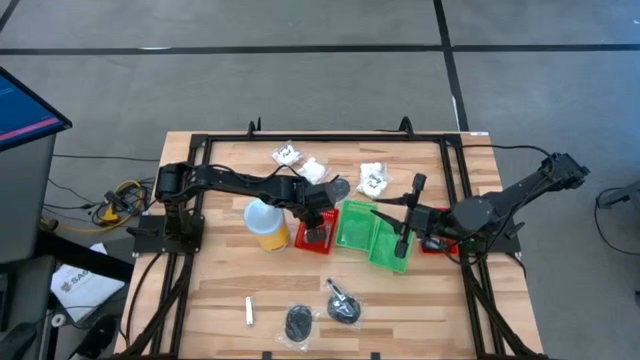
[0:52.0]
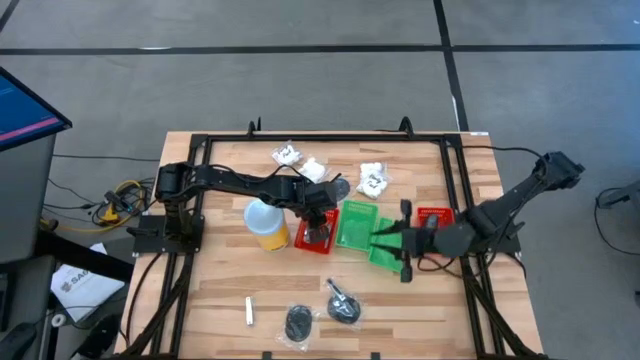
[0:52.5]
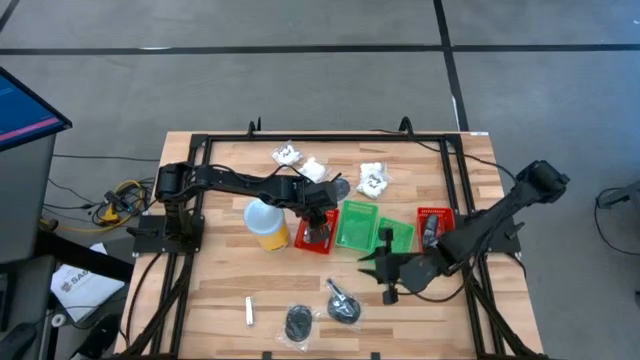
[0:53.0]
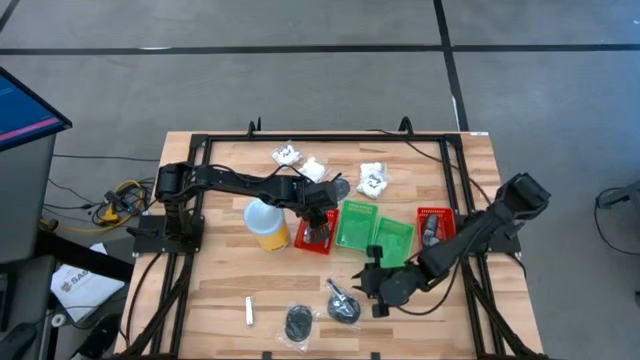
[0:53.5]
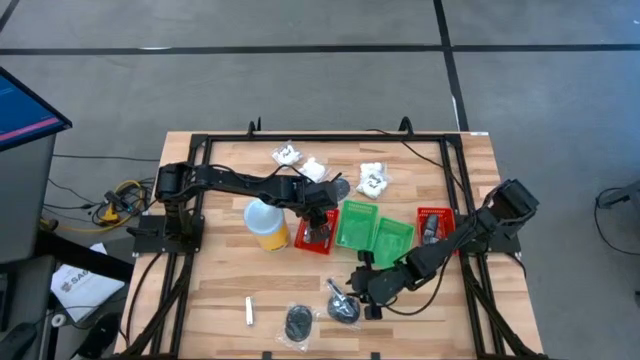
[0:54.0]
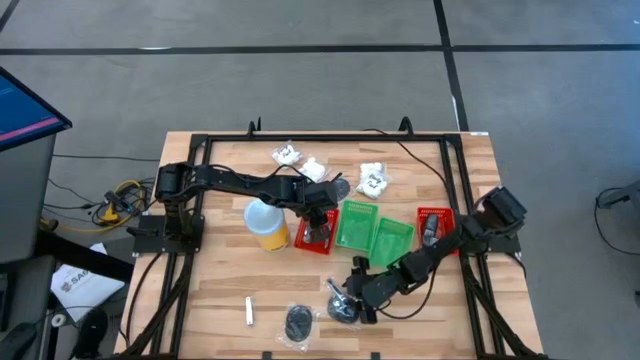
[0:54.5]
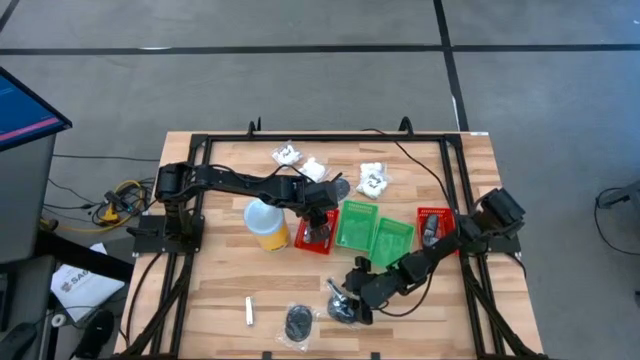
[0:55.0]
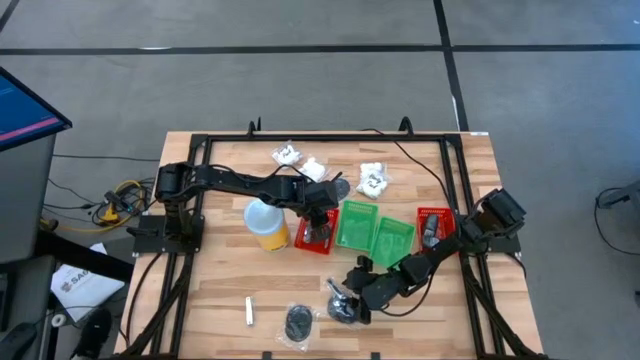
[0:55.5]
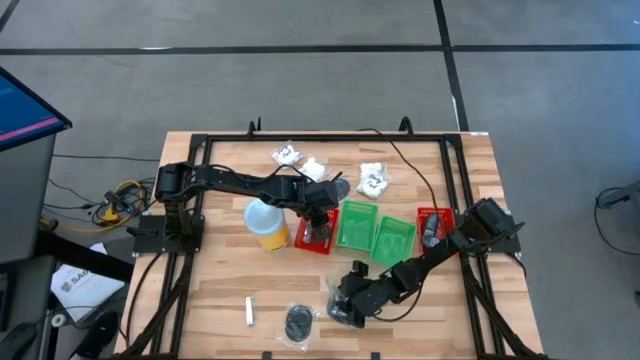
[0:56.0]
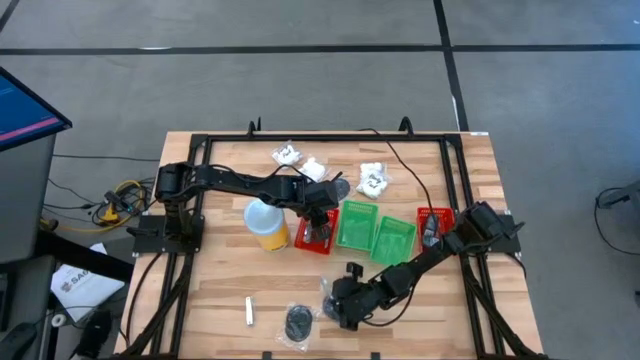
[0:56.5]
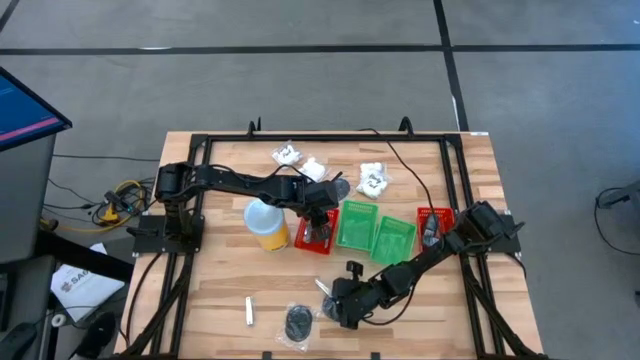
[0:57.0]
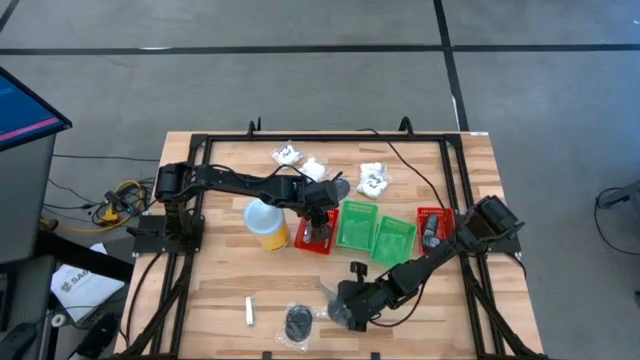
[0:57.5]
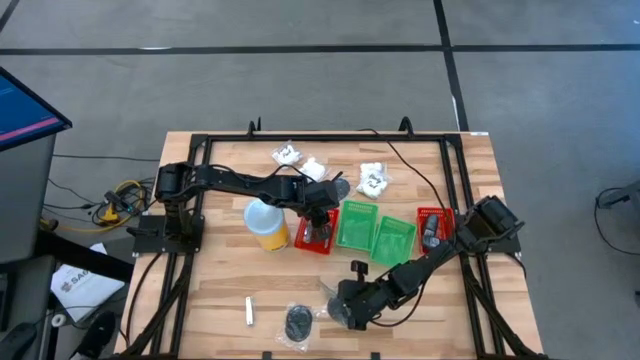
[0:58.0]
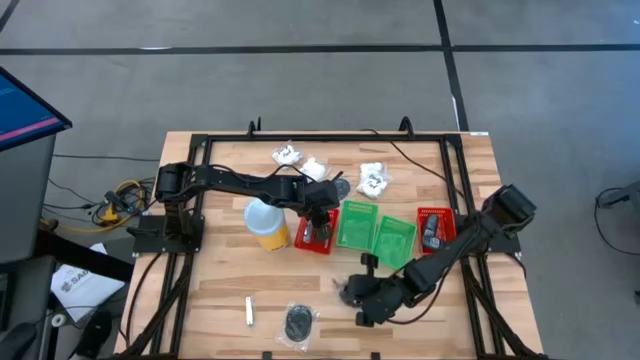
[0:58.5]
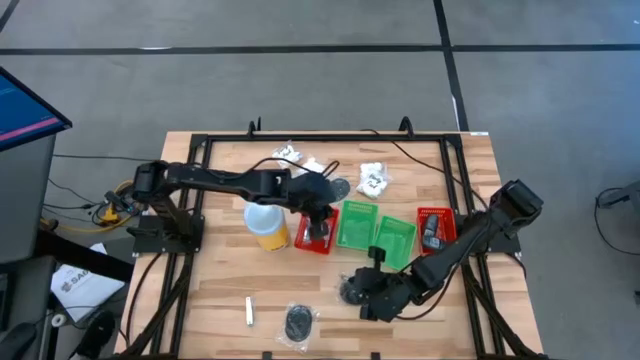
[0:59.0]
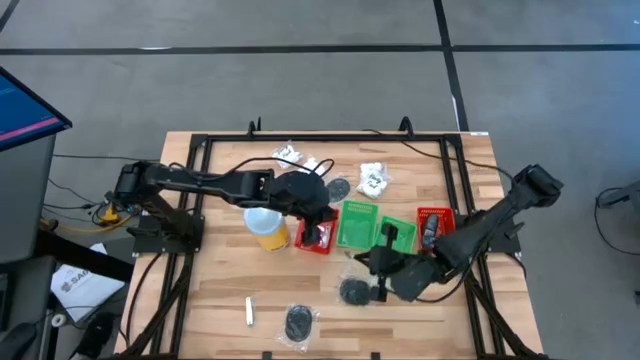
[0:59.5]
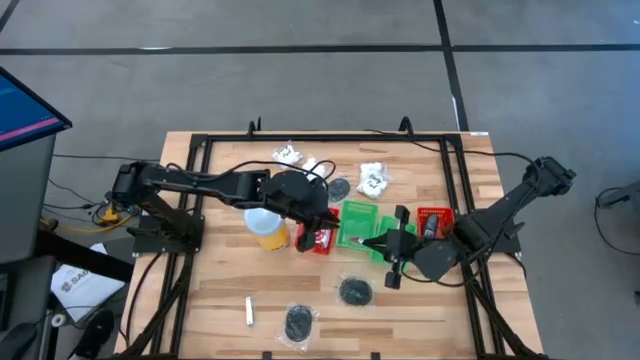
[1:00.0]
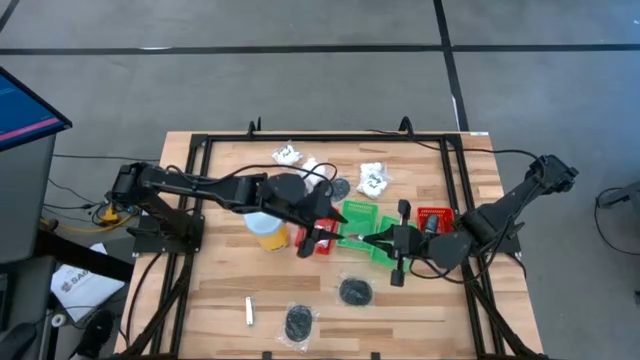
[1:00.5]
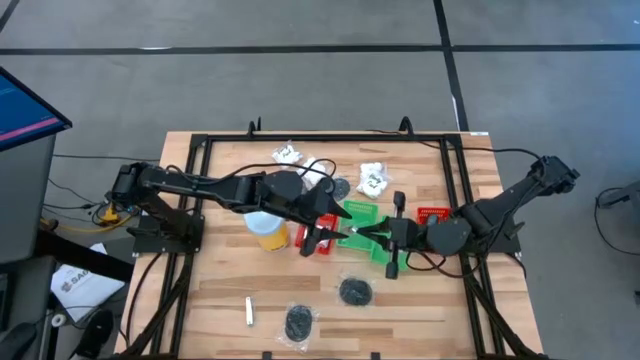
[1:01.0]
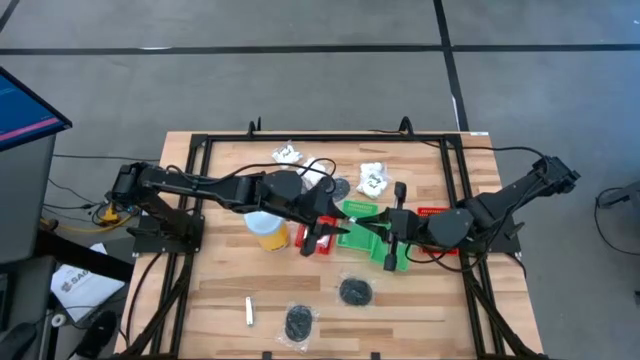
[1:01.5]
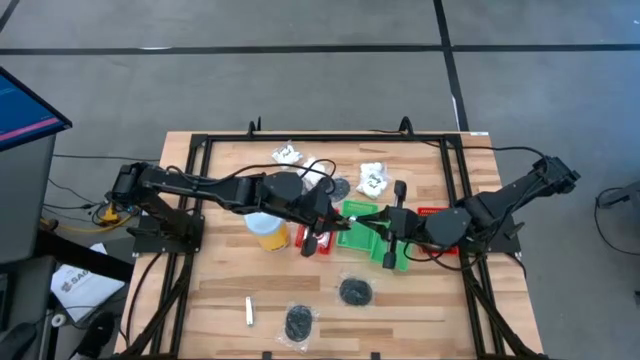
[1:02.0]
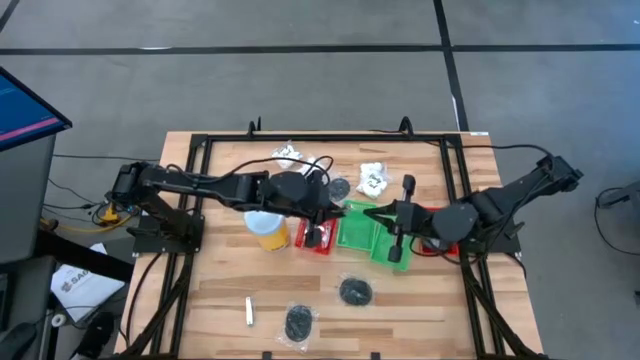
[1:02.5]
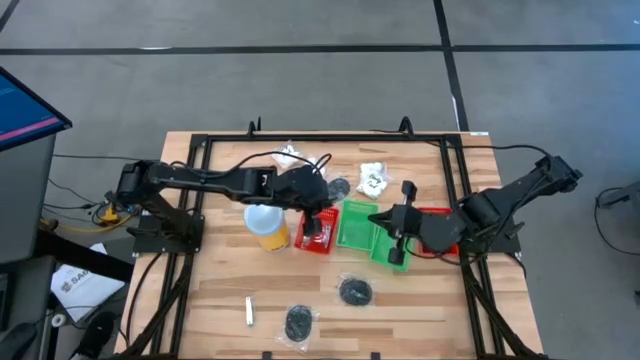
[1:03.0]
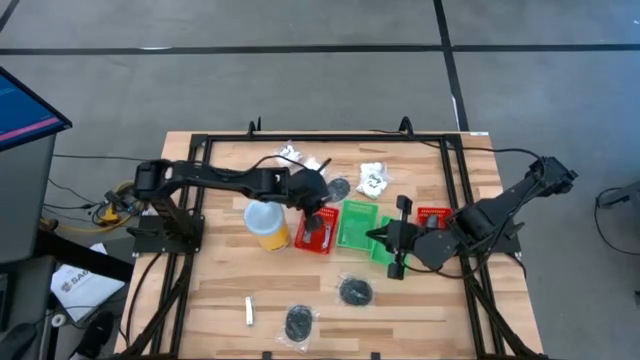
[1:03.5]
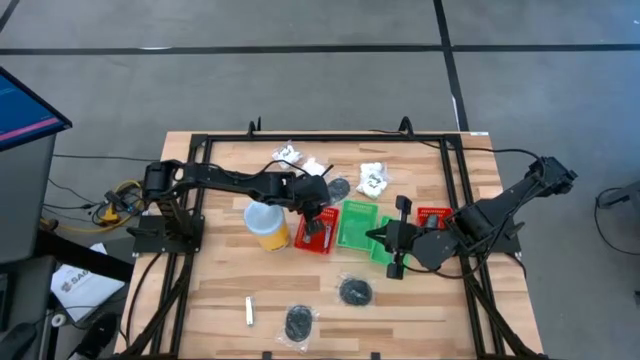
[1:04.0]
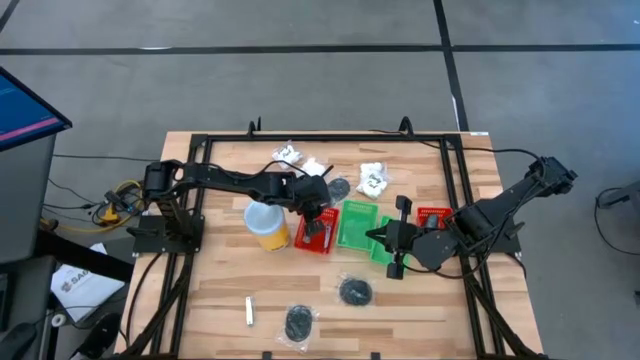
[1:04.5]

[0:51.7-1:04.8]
Task: Pick & Place Travel size toiletries
Put the nail cutter into the left red bin

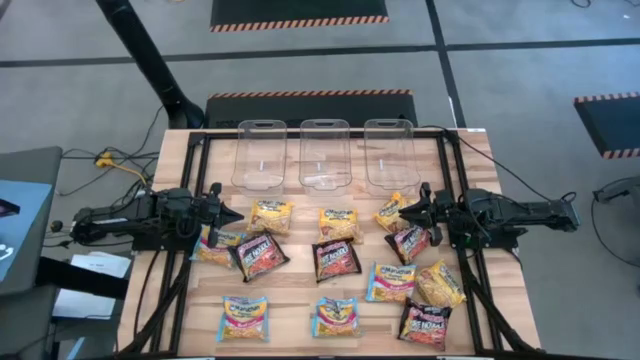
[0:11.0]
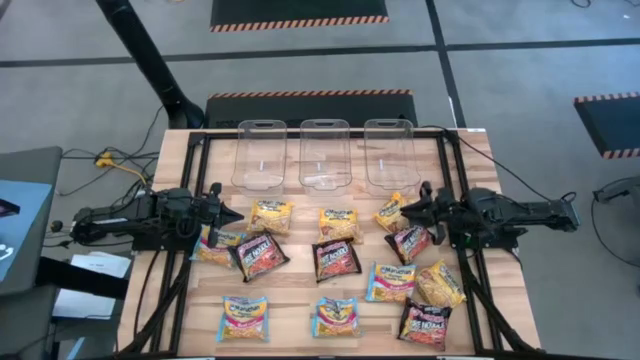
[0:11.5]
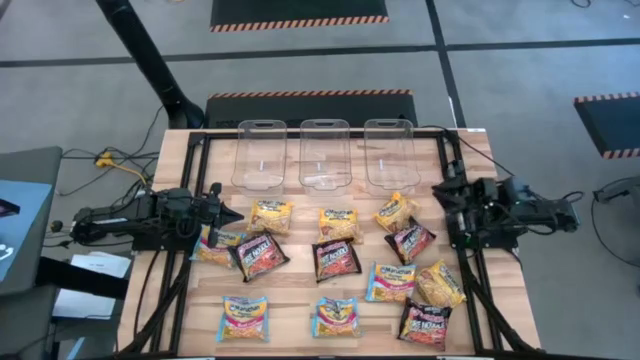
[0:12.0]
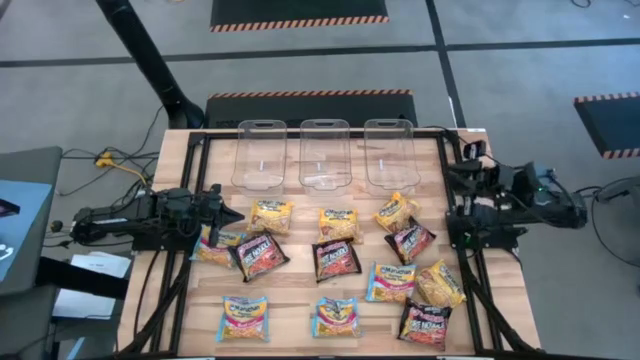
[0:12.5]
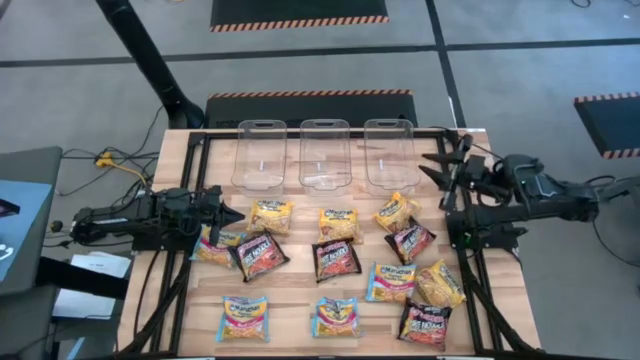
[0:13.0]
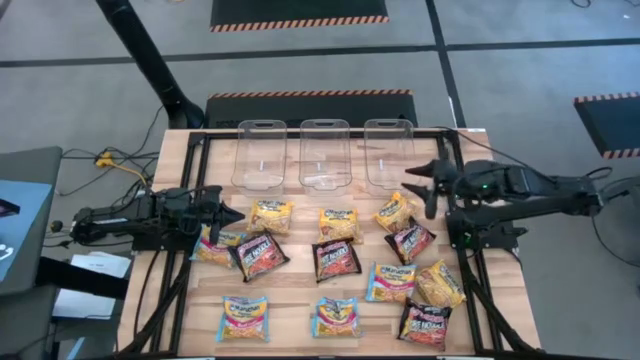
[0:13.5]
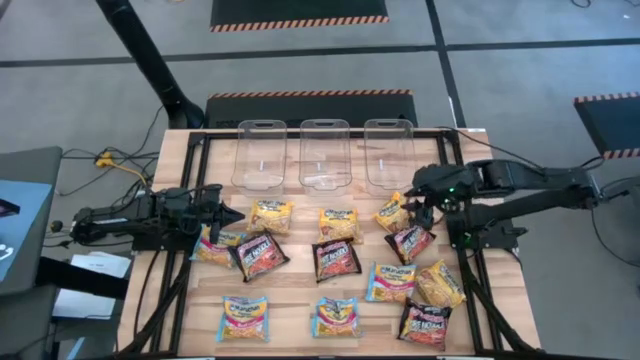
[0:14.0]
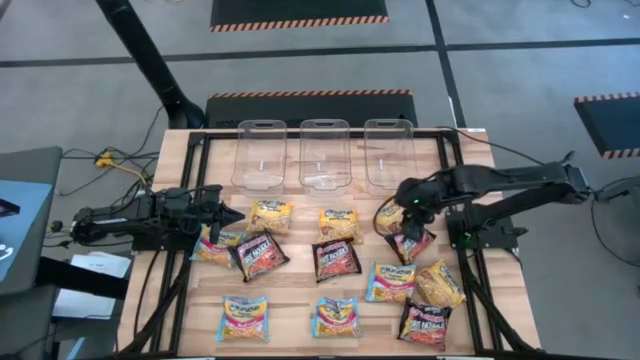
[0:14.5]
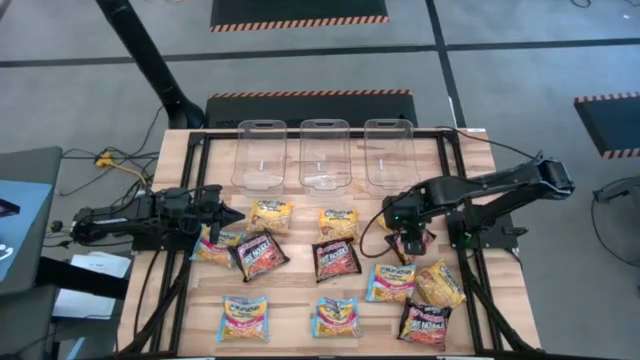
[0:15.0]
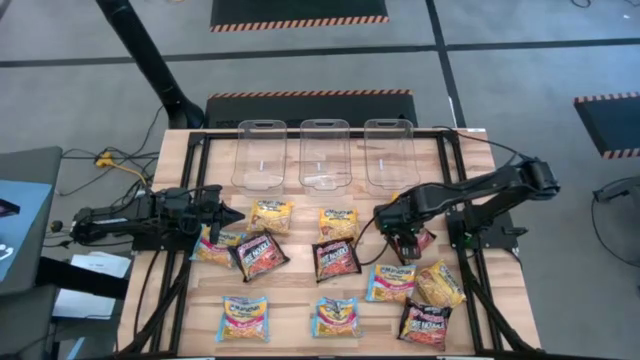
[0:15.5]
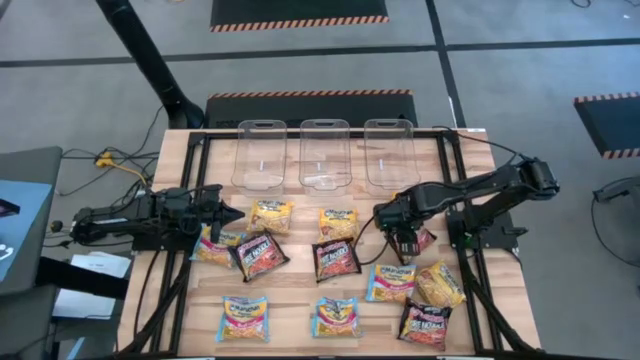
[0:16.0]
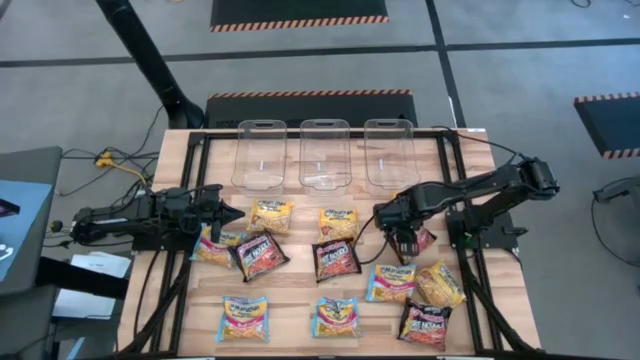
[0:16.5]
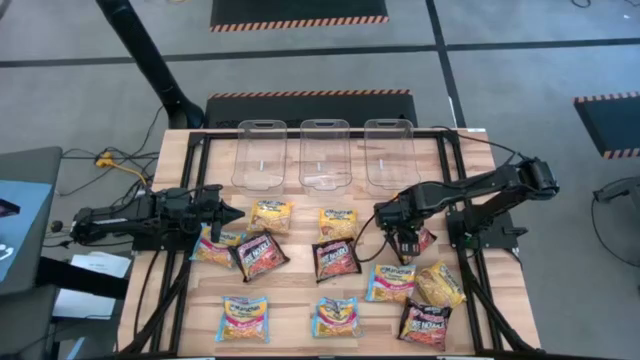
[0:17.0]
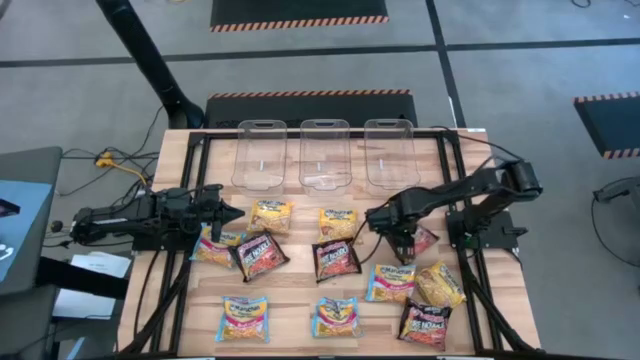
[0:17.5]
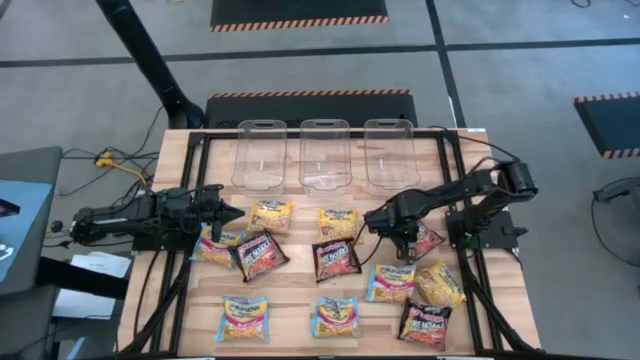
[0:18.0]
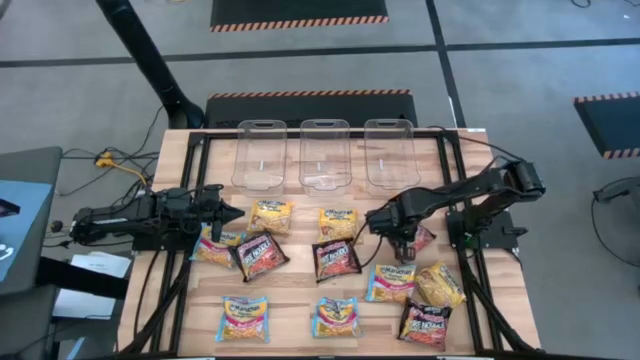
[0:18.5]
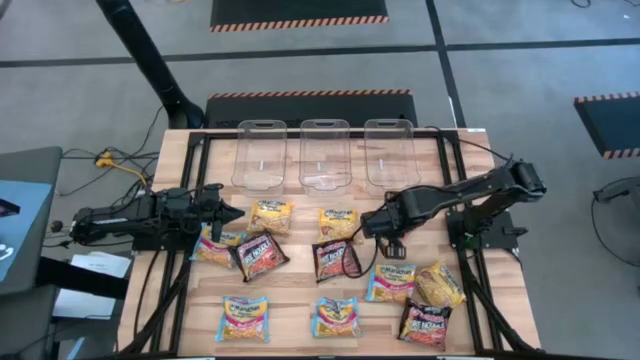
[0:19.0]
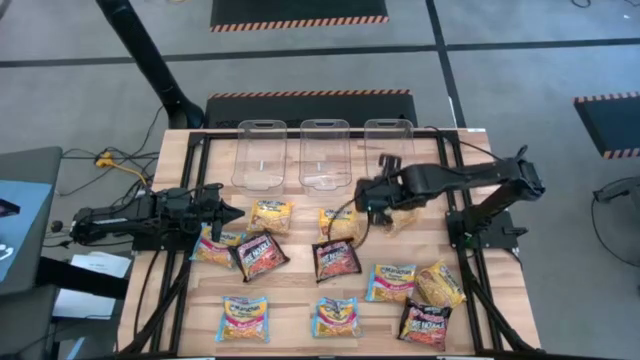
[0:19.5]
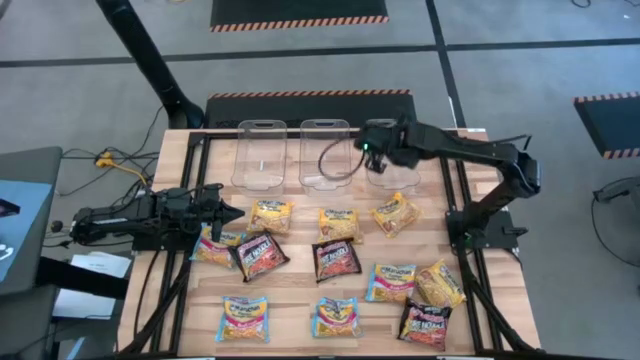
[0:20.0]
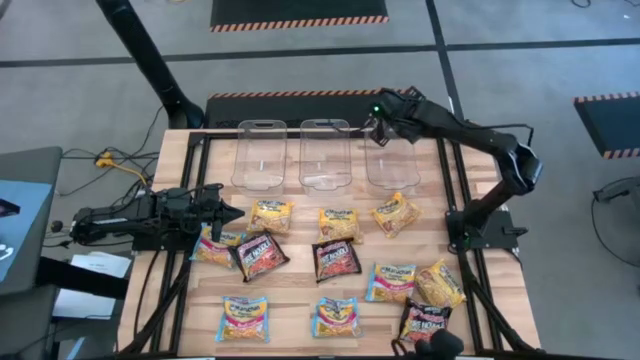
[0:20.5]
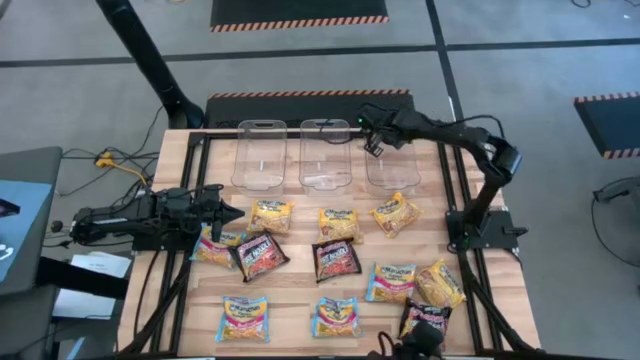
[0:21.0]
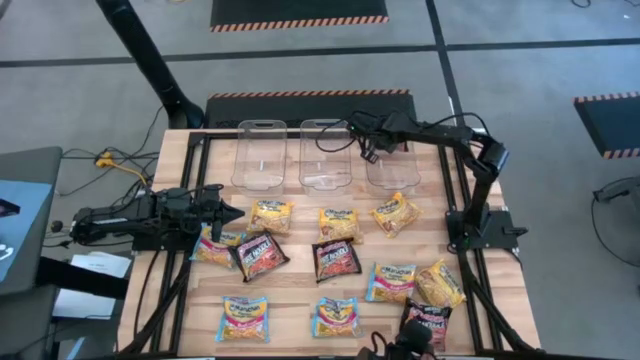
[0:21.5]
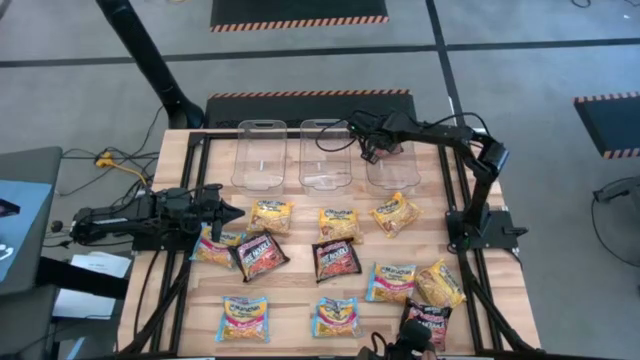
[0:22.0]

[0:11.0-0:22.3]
Task: Sort Maruchan noodles
Put the black noodle pack into the right transparent bin
